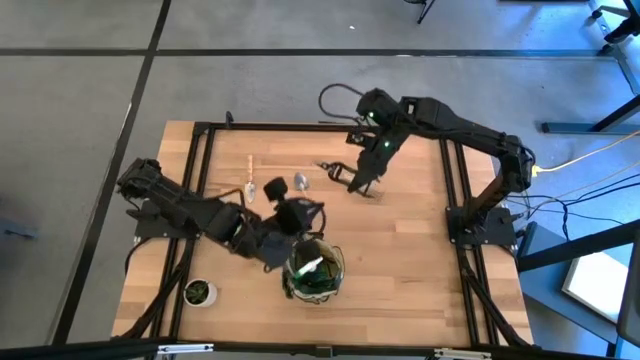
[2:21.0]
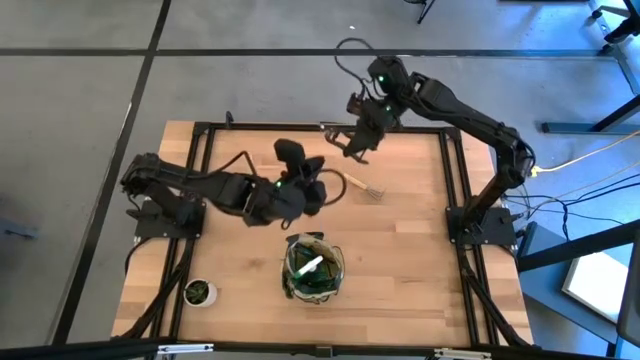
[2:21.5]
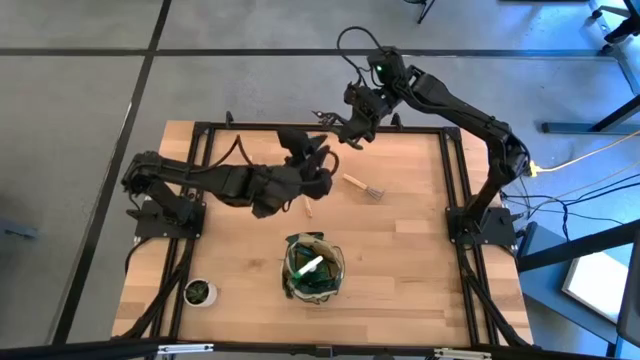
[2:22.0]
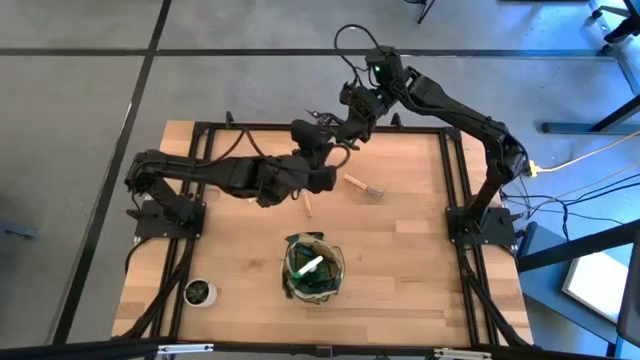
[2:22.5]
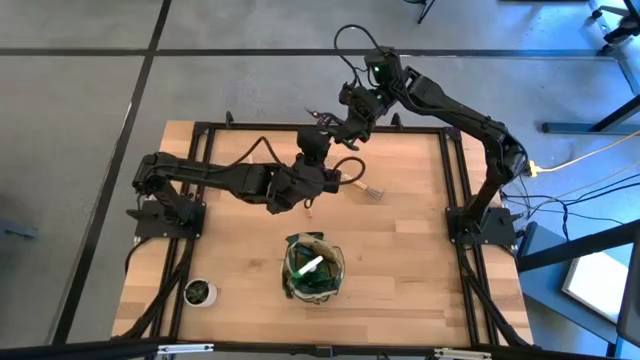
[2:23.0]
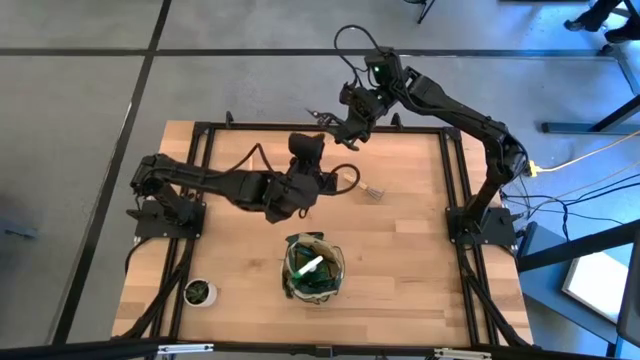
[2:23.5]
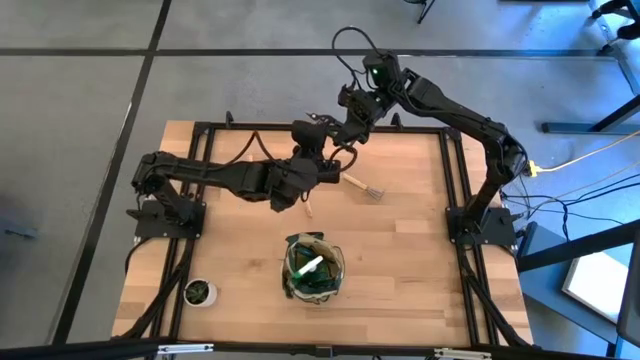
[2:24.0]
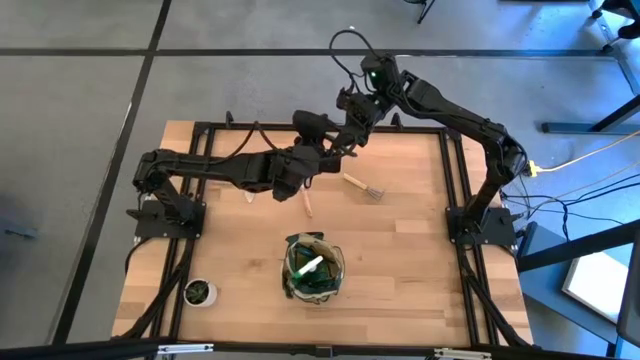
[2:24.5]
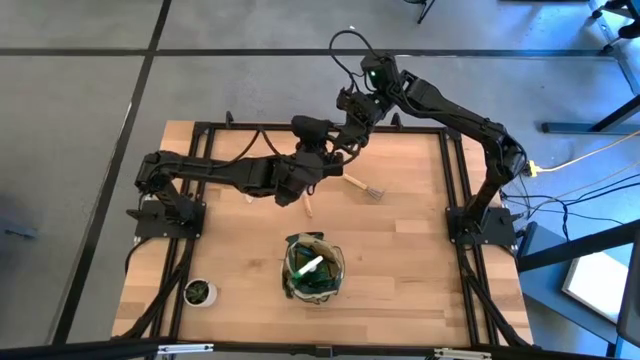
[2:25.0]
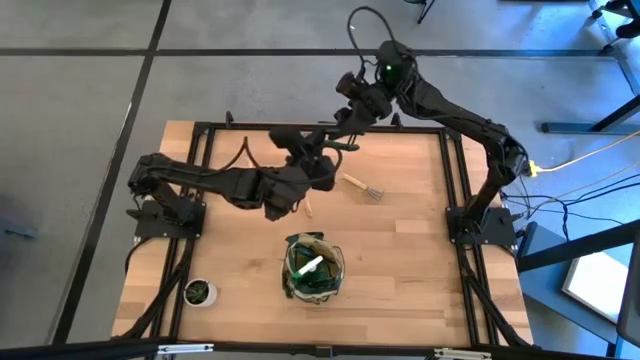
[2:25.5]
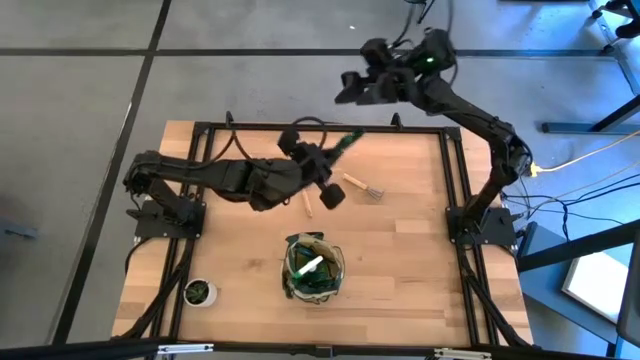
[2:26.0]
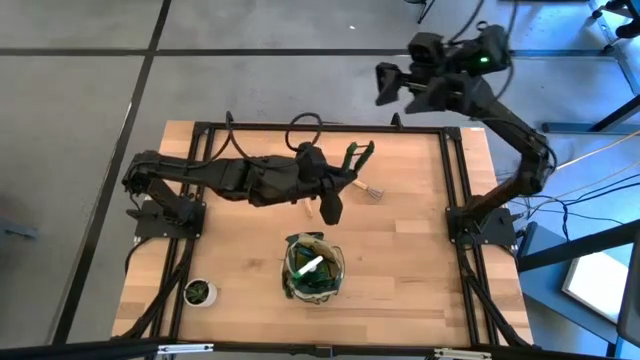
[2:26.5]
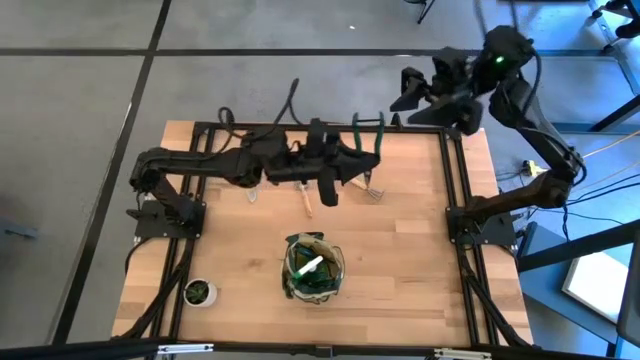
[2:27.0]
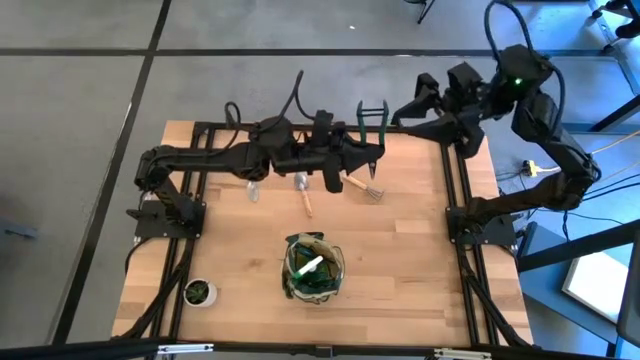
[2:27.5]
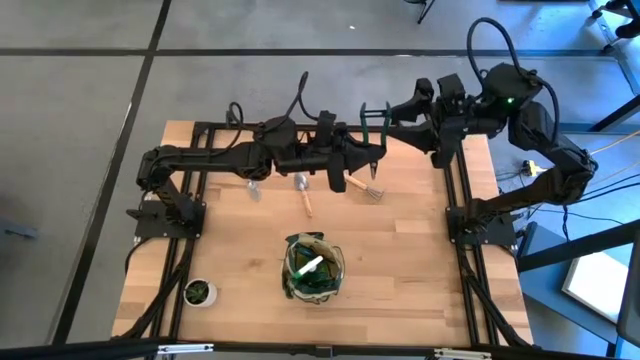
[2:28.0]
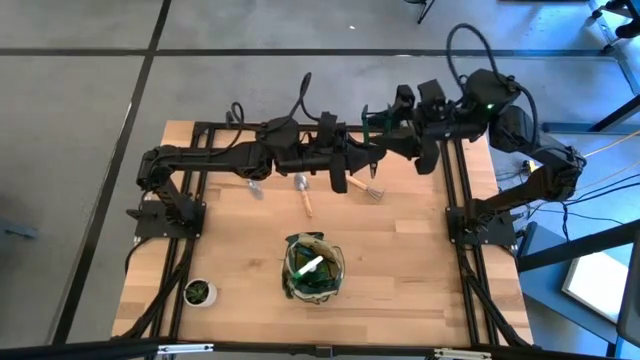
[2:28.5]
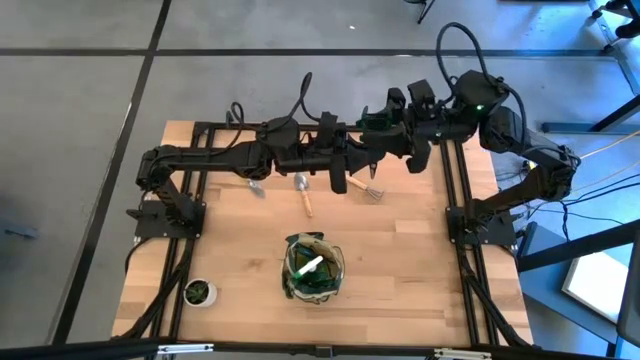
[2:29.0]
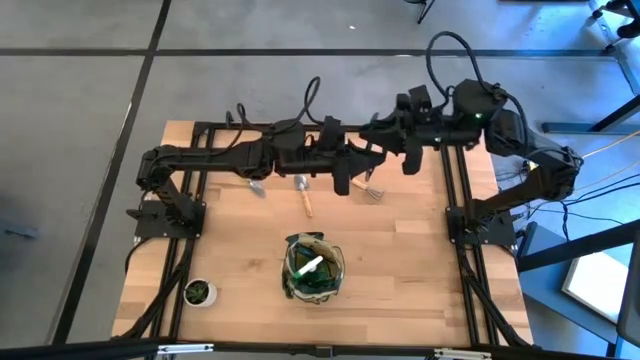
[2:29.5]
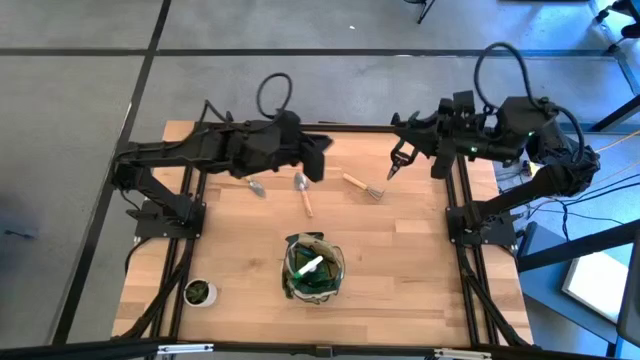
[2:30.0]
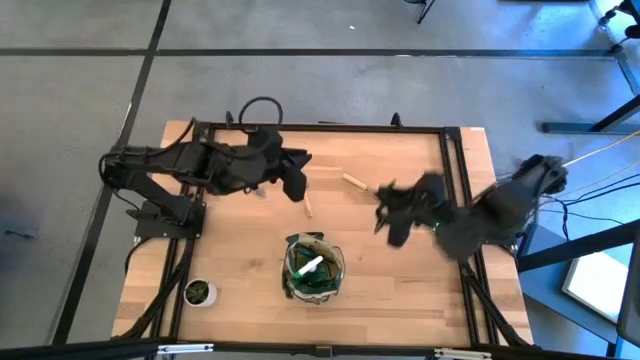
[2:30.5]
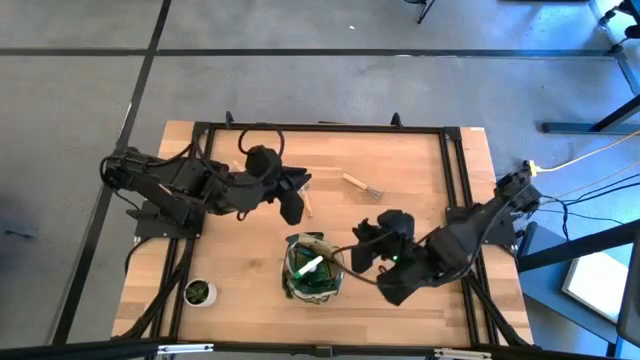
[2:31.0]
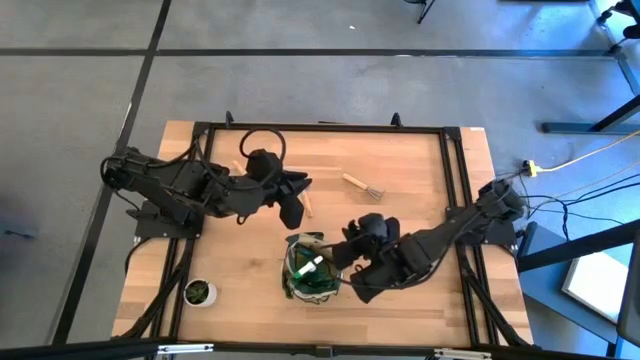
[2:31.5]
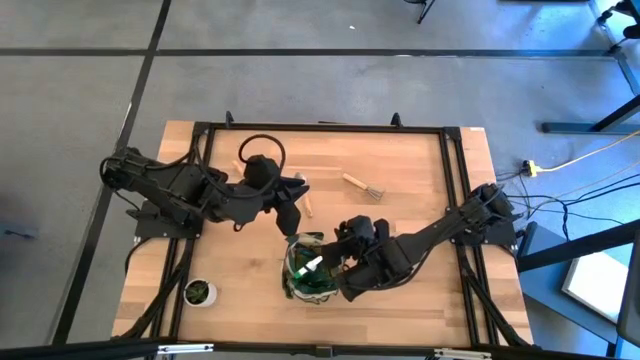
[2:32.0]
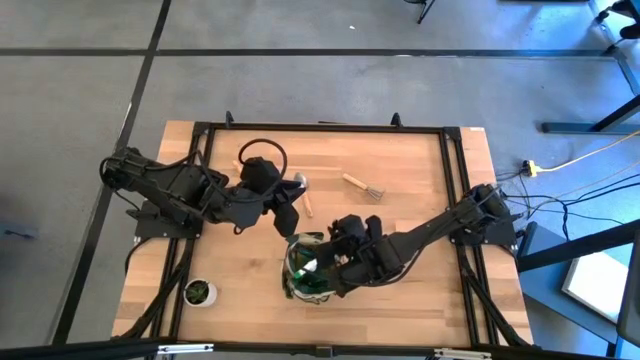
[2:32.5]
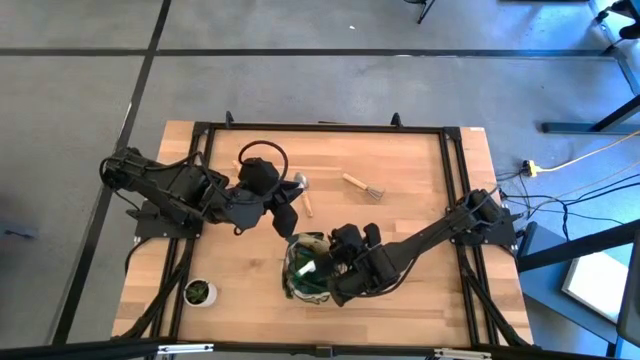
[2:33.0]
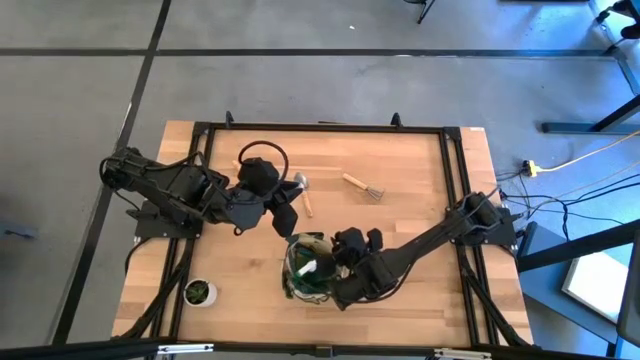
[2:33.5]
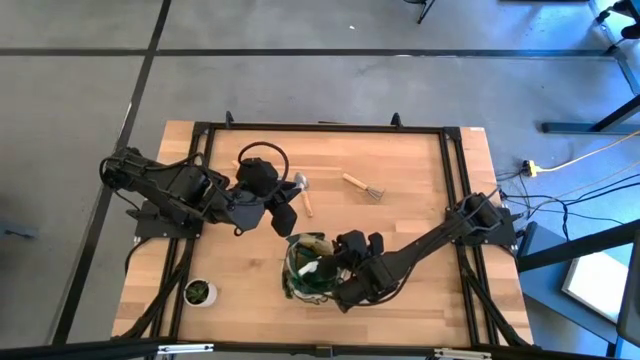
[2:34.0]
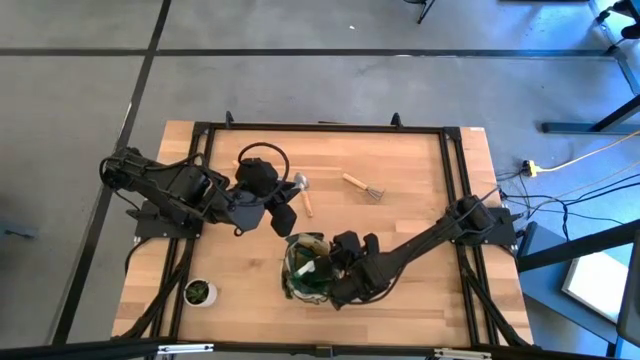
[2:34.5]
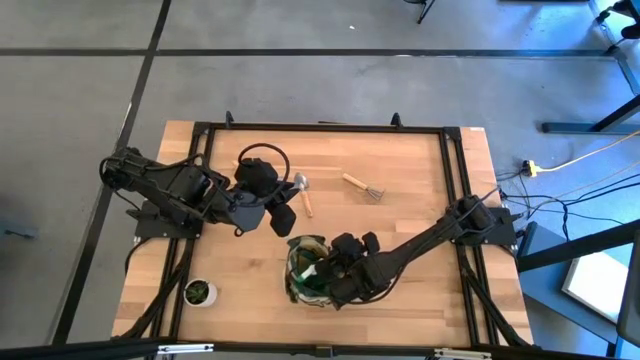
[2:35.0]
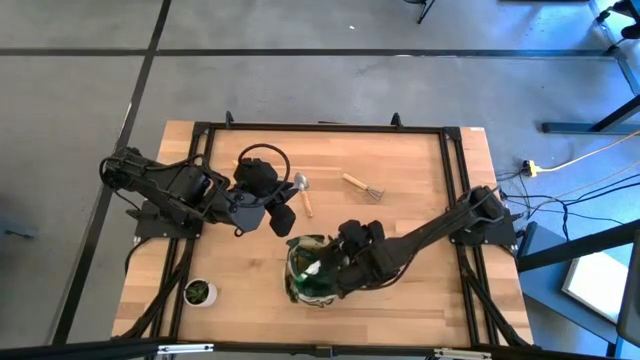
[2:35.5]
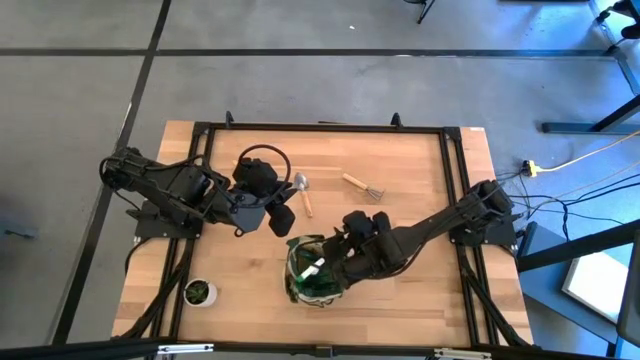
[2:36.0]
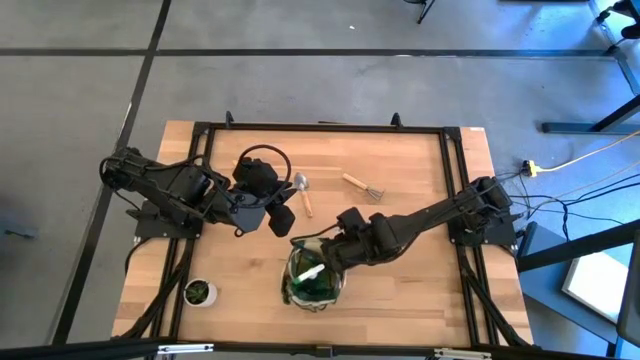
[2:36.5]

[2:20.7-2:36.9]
Task: Pick & Place Garden tools in Gardening bag
Put the green fruit pruner into the gardening bag
